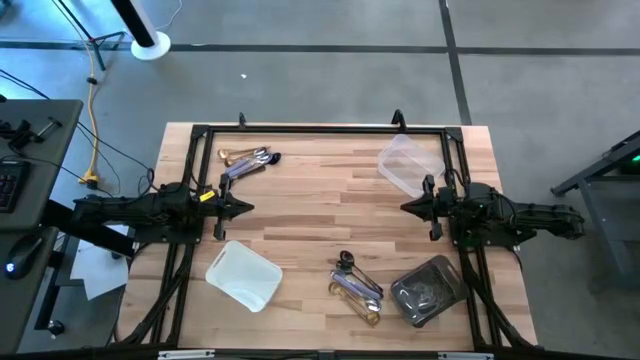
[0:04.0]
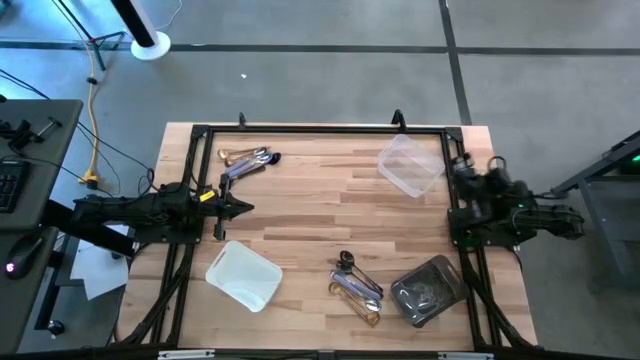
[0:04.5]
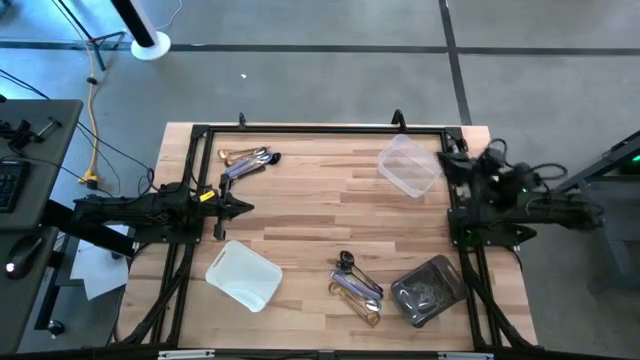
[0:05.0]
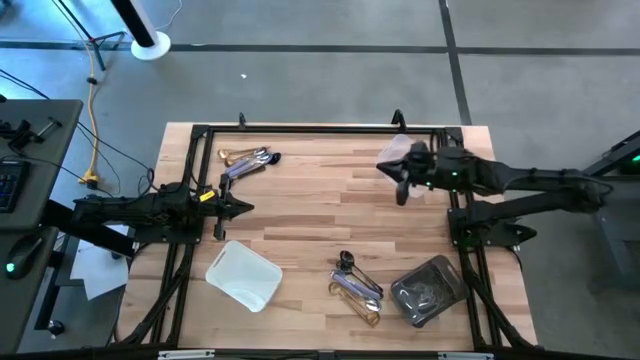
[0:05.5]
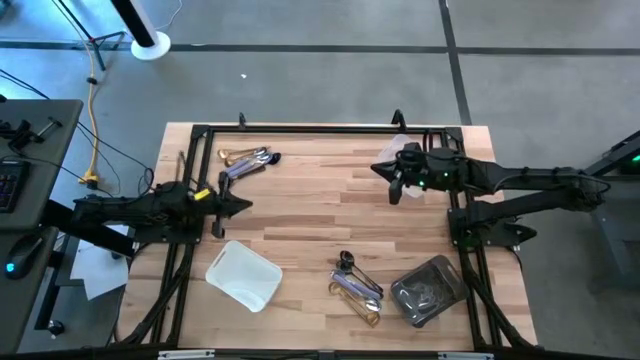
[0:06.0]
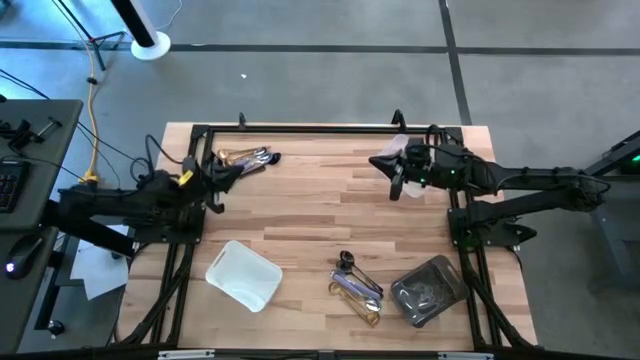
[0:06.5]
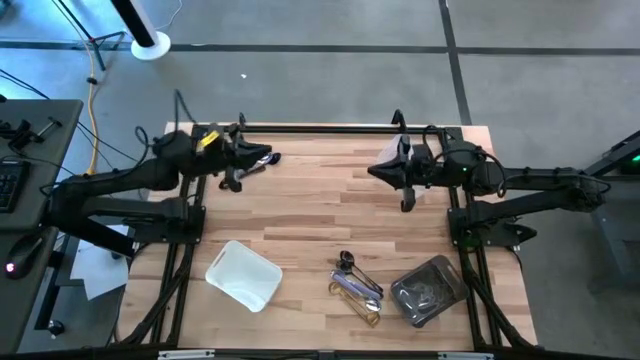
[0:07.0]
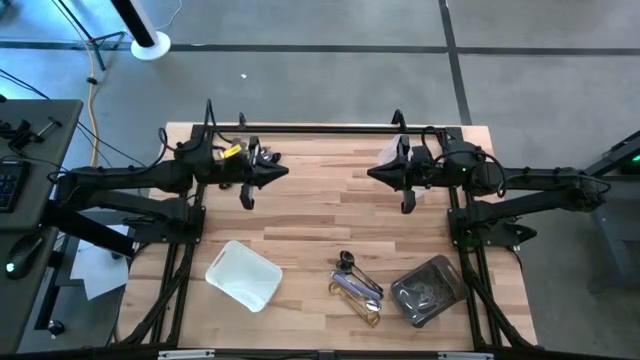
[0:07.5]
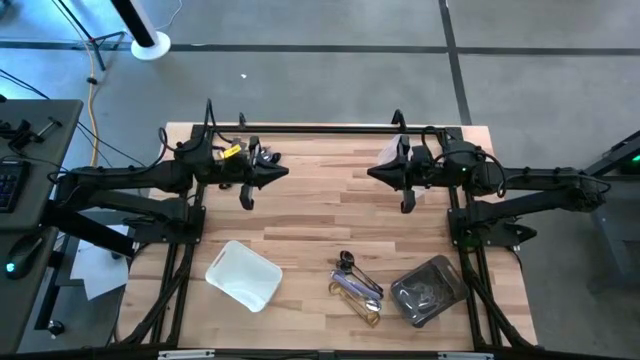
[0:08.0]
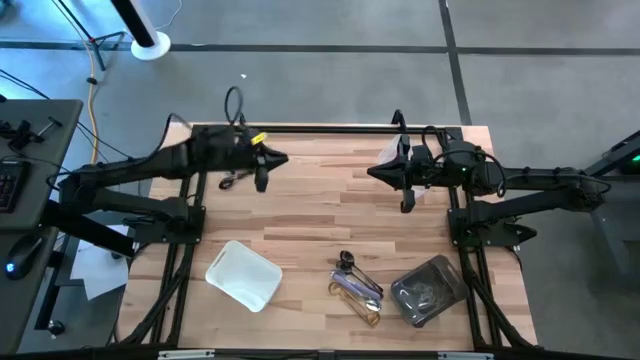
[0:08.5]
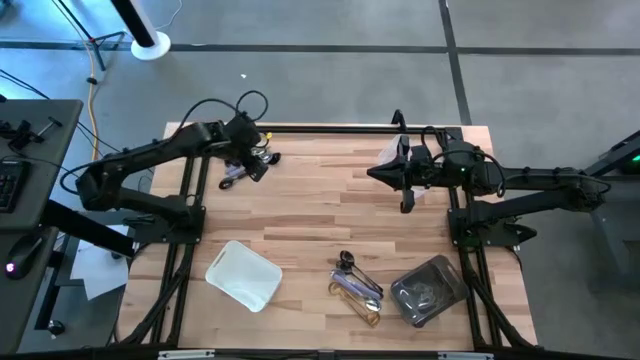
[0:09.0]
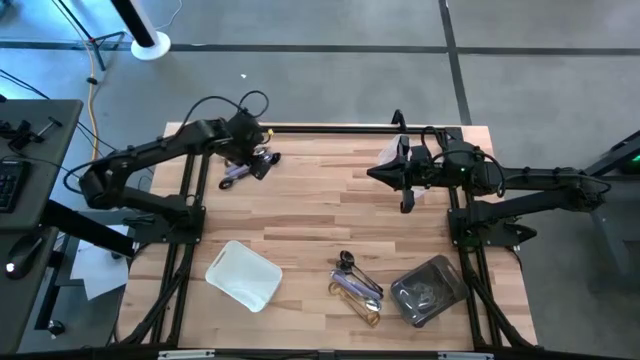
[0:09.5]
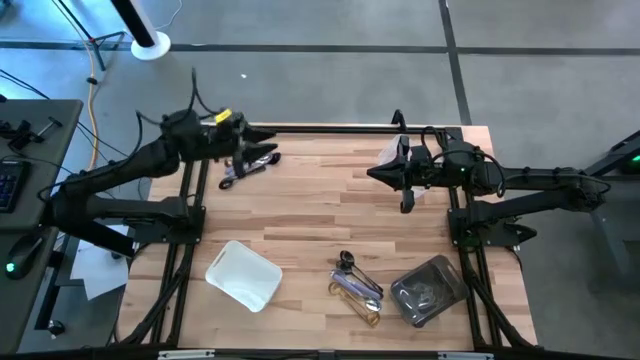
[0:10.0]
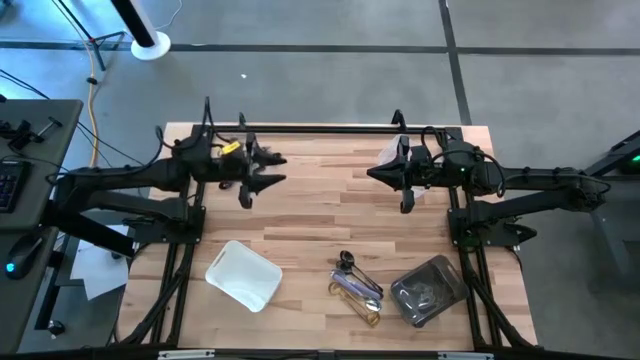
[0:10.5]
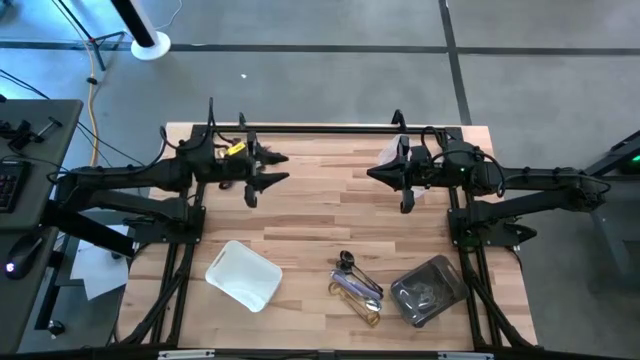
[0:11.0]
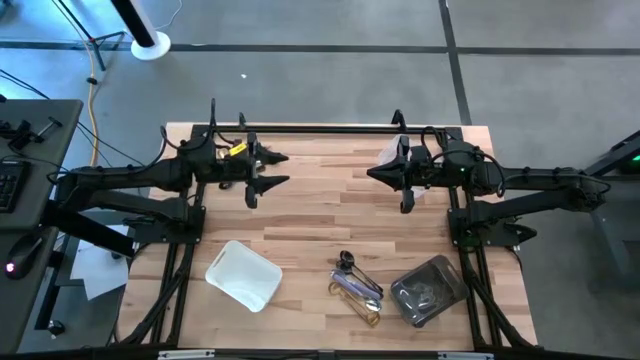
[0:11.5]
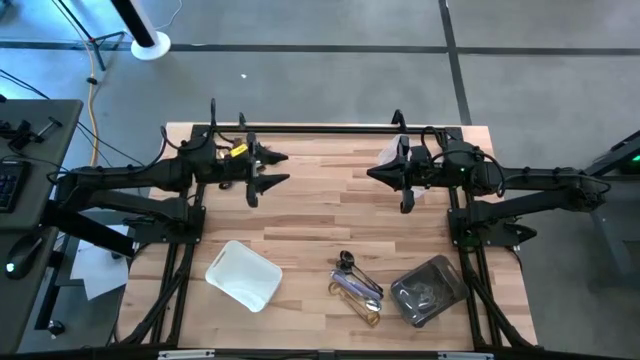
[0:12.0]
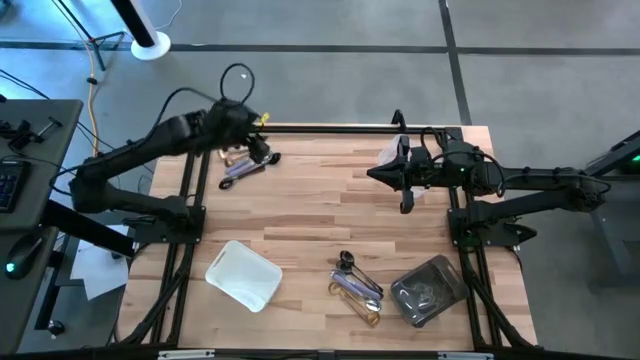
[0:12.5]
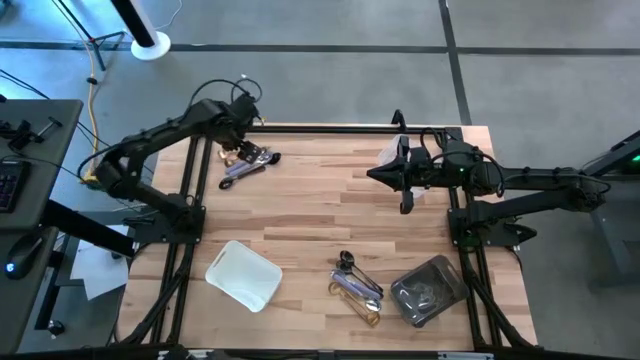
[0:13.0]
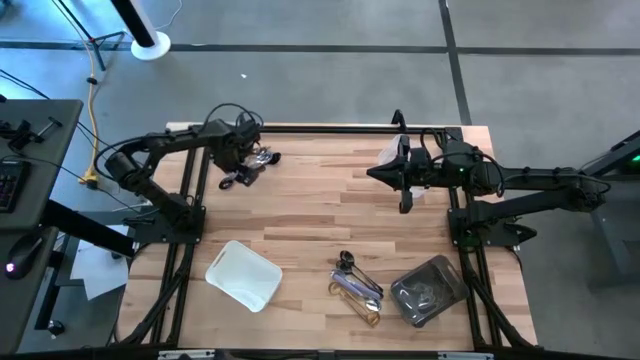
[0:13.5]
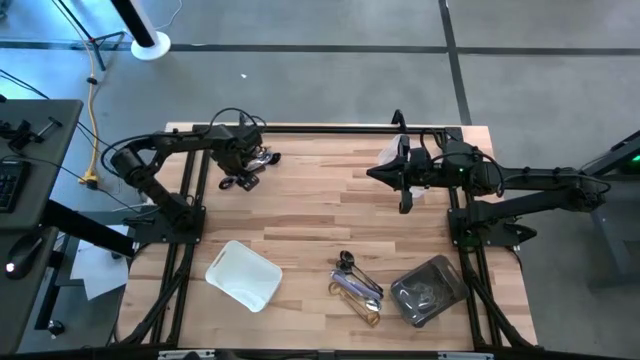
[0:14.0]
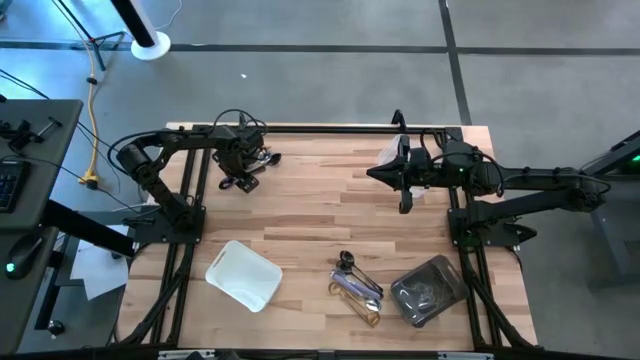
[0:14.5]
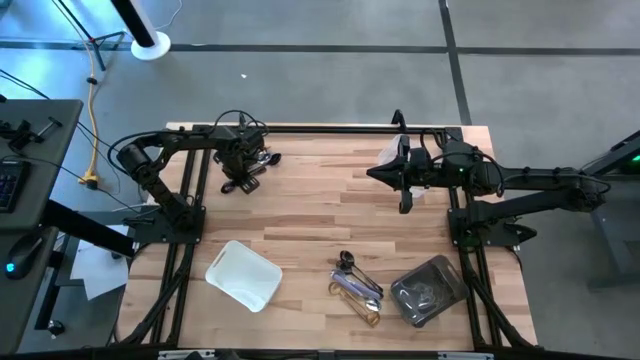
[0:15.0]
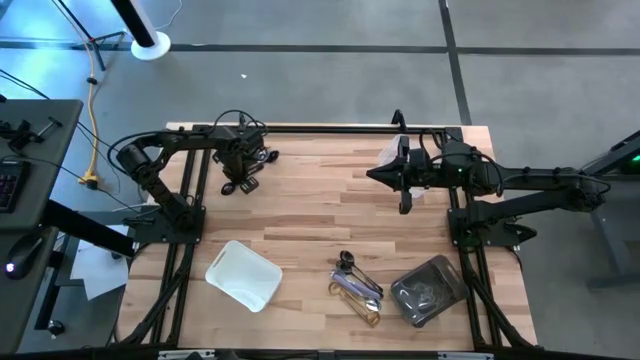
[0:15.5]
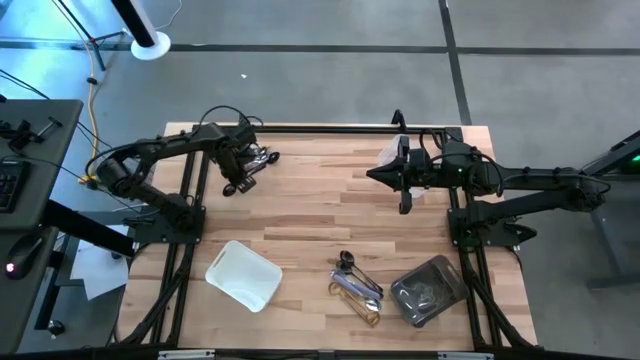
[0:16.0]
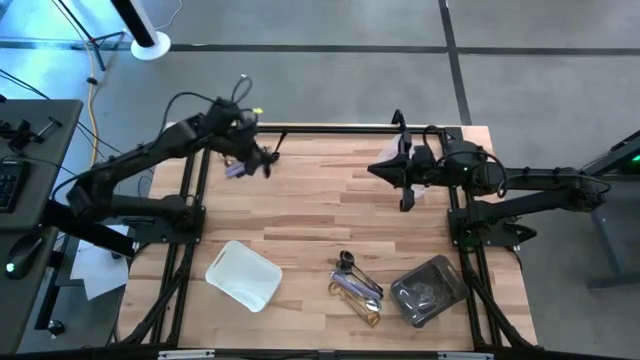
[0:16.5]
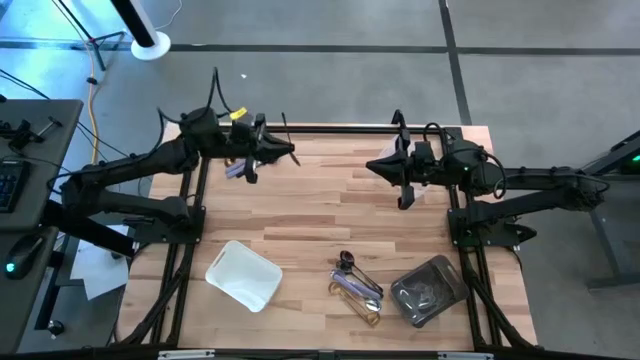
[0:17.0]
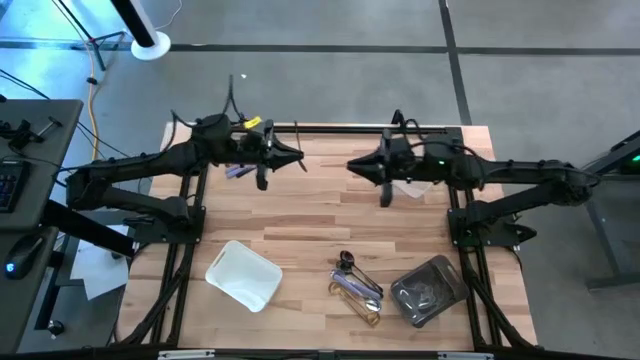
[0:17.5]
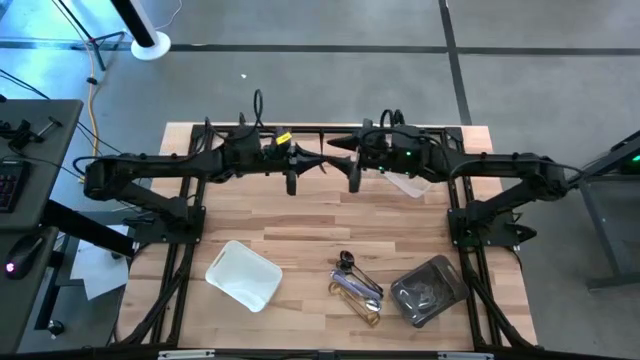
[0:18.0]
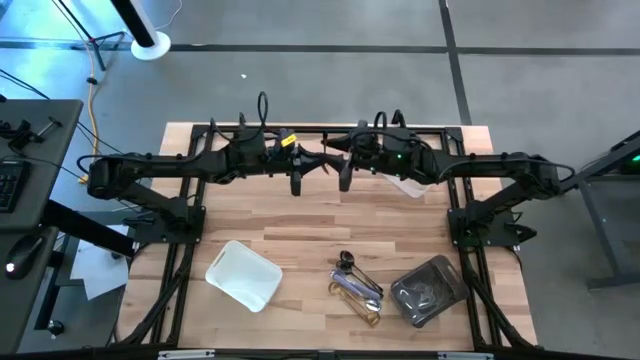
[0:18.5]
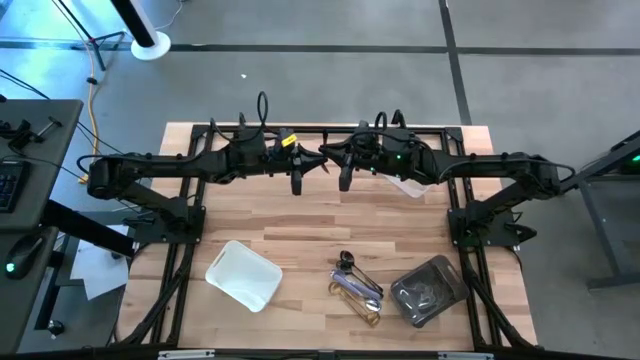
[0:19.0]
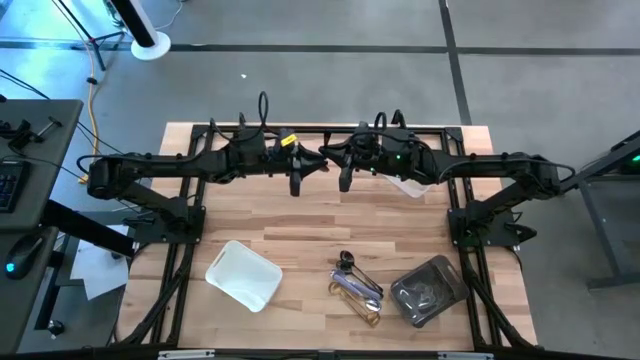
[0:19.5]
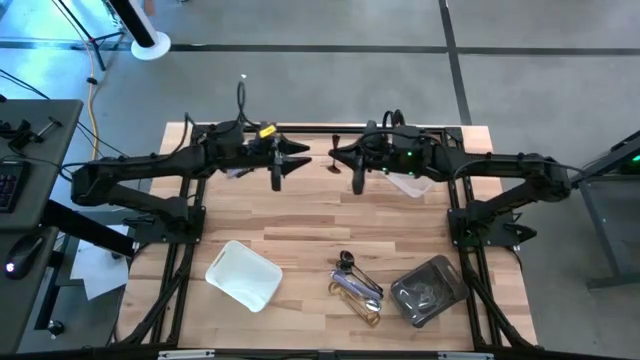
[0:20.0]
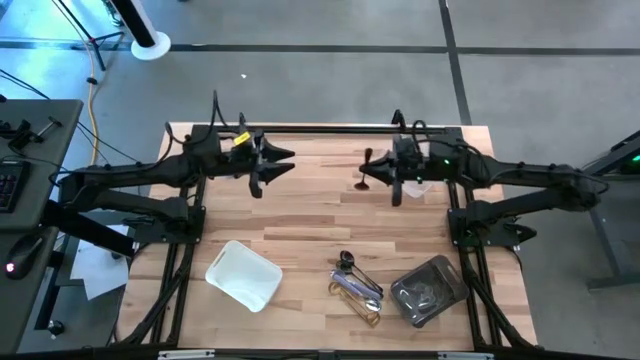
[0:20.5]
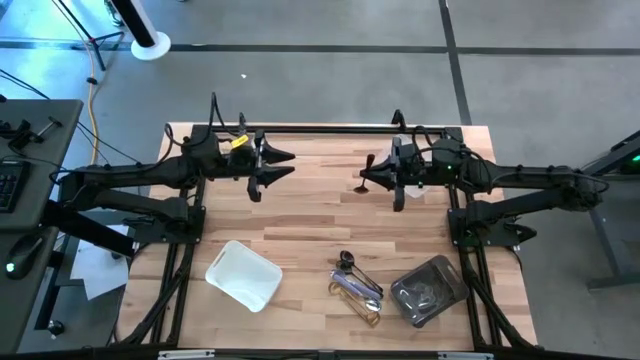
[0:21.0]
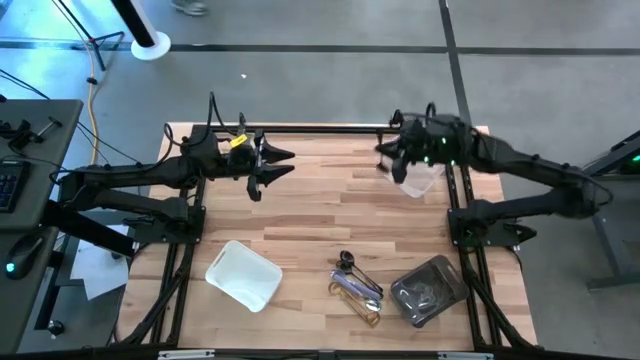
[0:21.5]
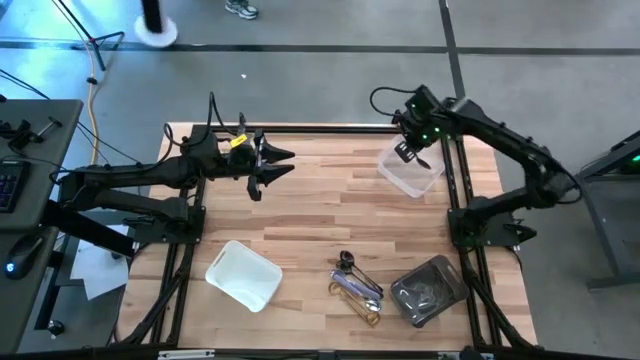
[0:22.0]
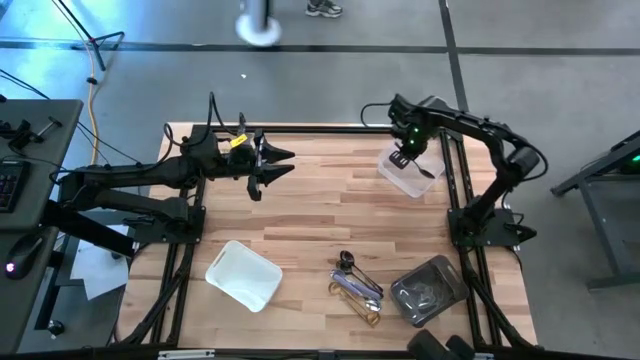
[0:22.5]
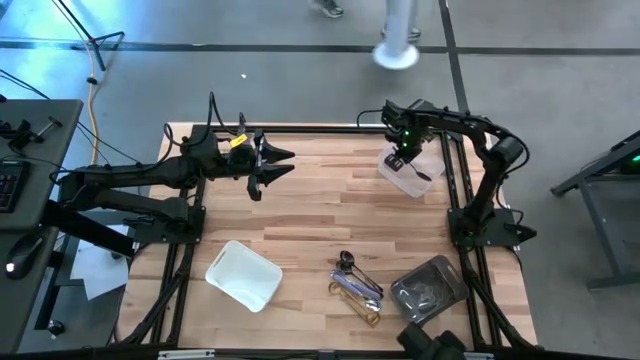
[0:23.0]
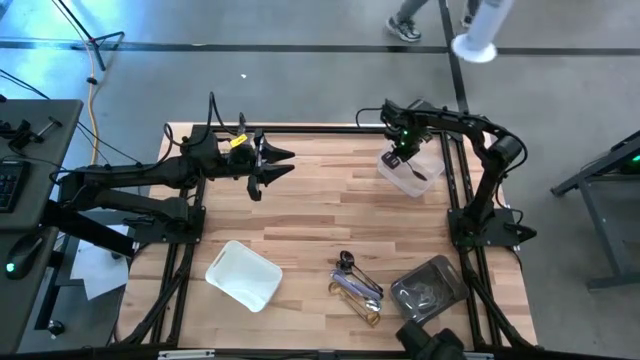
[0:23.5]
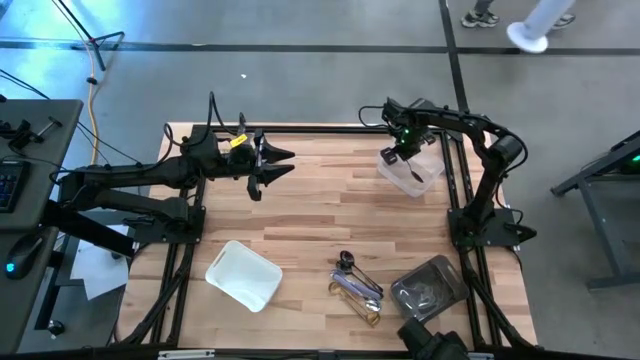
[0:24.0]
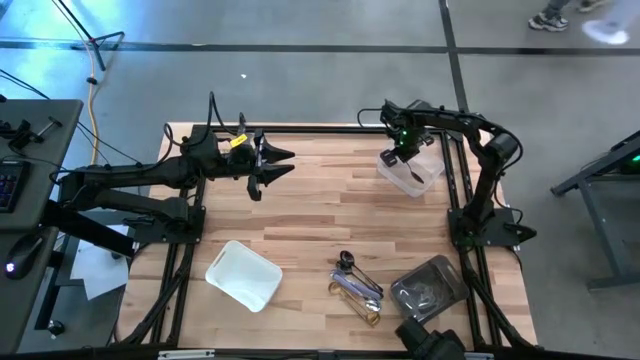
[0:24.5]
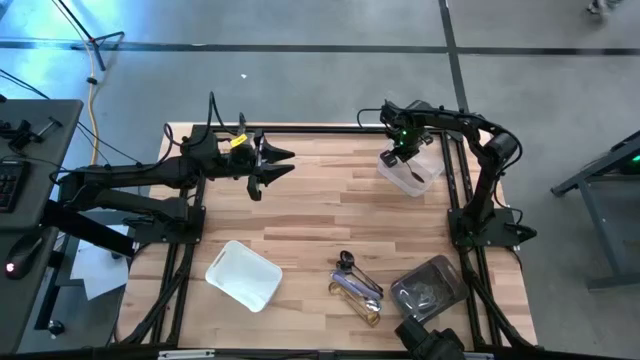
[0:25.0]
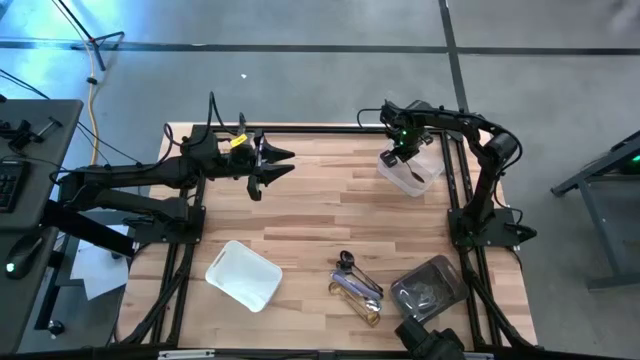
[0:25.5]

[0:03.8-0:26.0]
Task: Sort silverware by color (type)
Put the black spoon into the transparent bin
